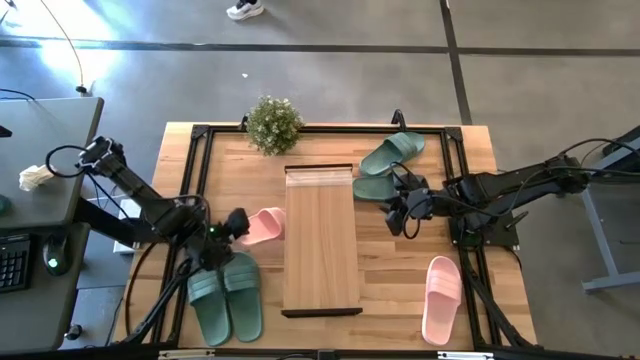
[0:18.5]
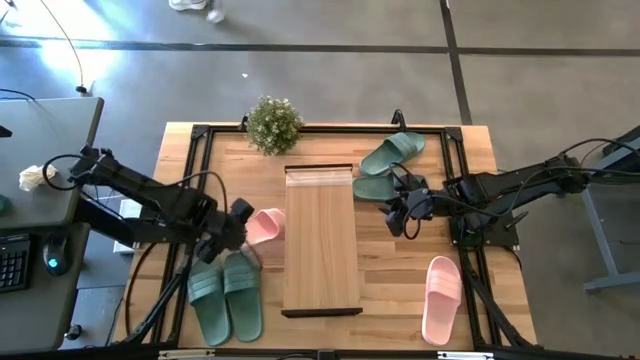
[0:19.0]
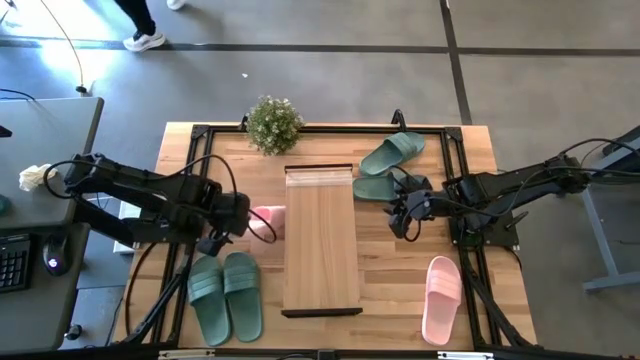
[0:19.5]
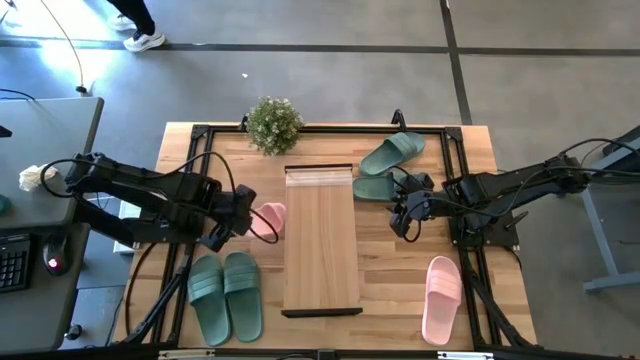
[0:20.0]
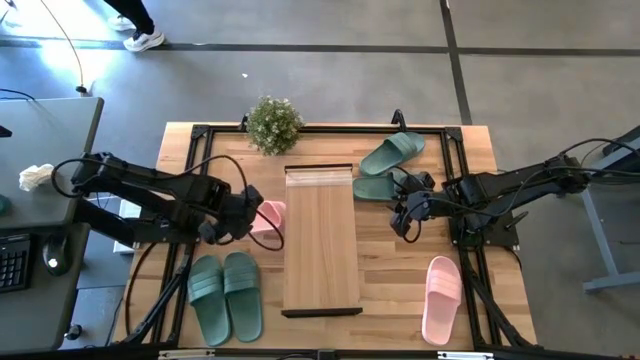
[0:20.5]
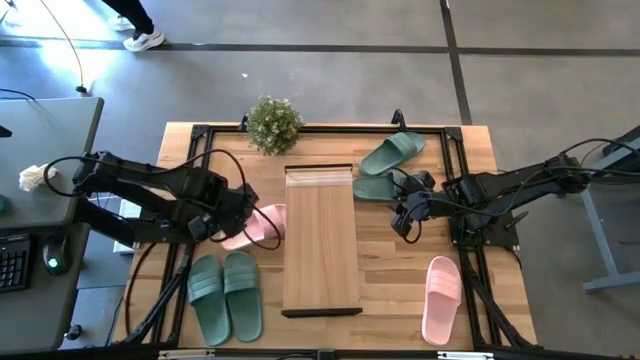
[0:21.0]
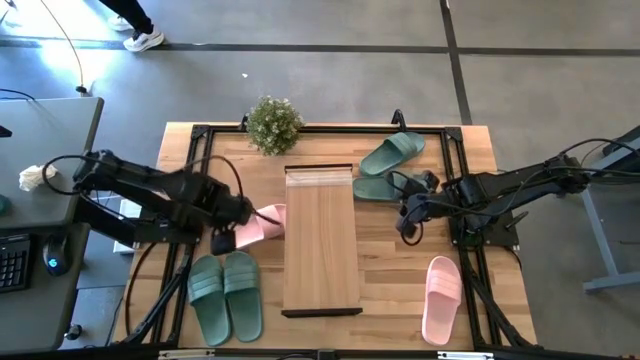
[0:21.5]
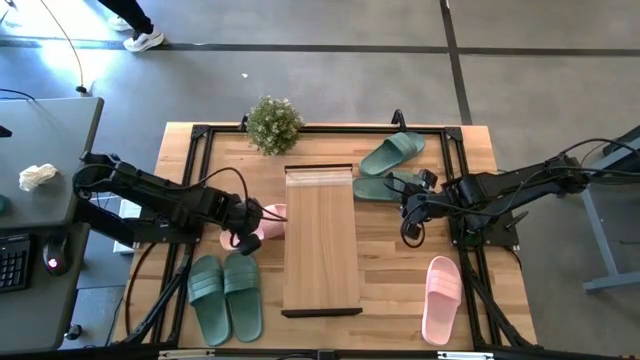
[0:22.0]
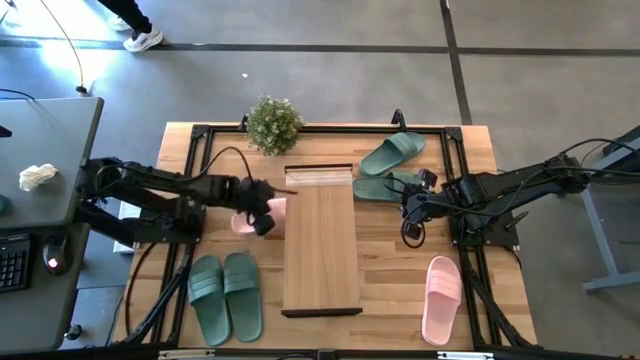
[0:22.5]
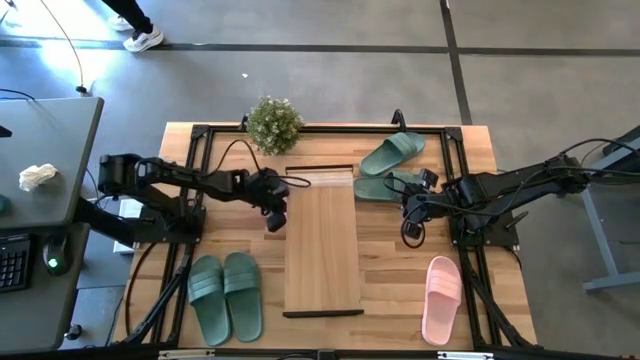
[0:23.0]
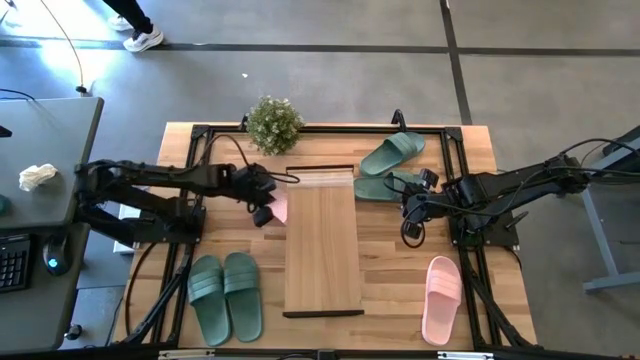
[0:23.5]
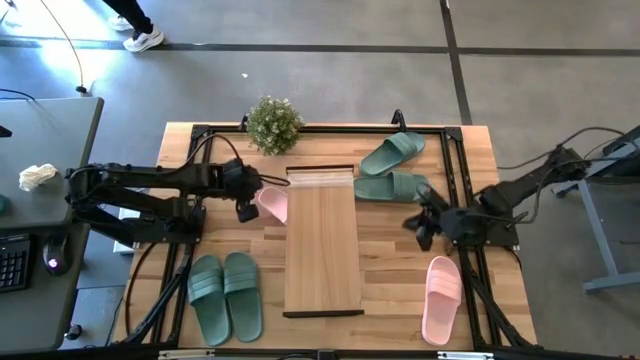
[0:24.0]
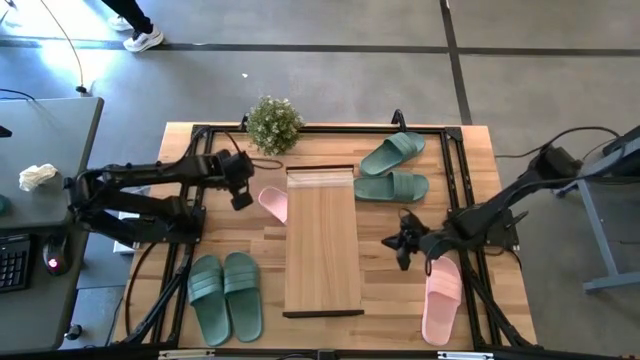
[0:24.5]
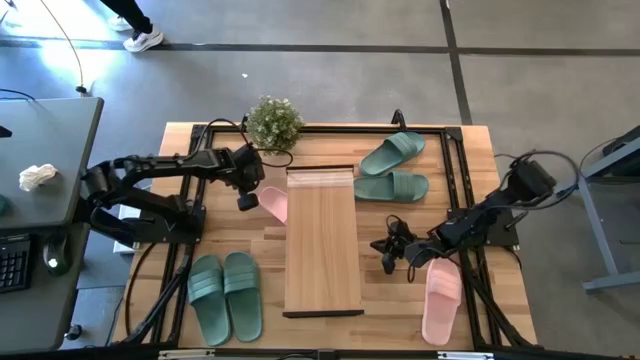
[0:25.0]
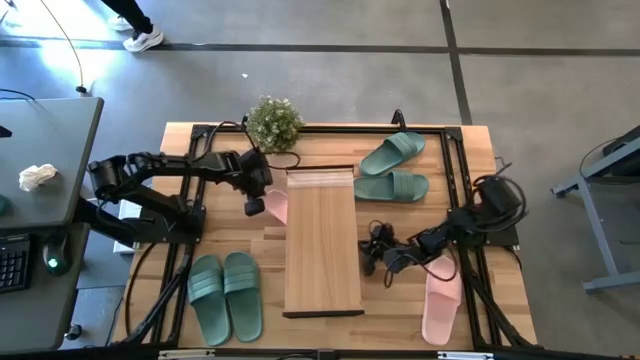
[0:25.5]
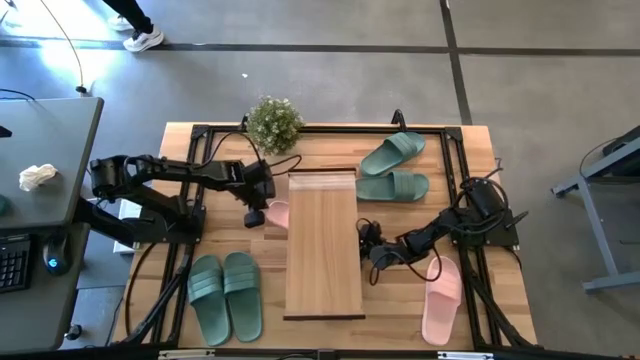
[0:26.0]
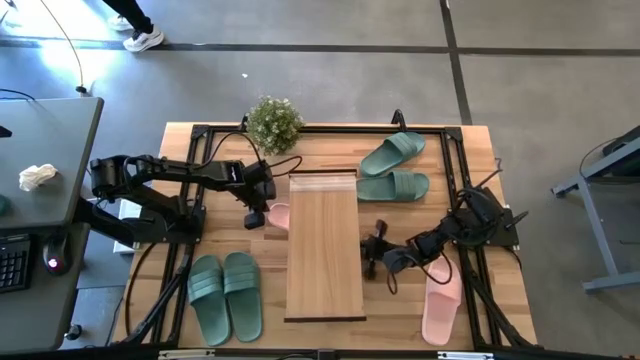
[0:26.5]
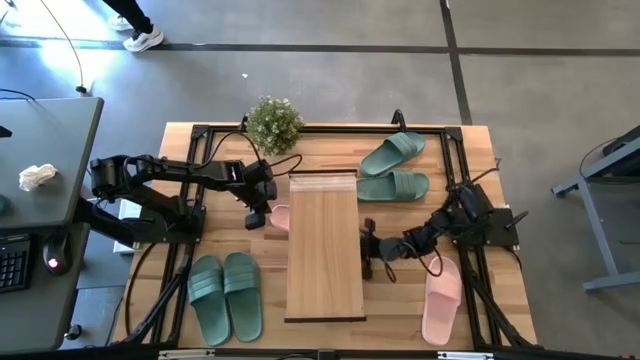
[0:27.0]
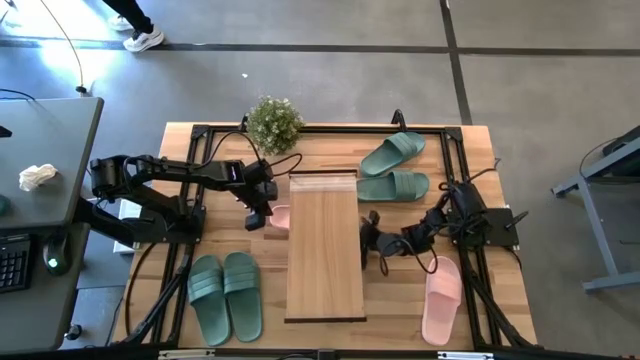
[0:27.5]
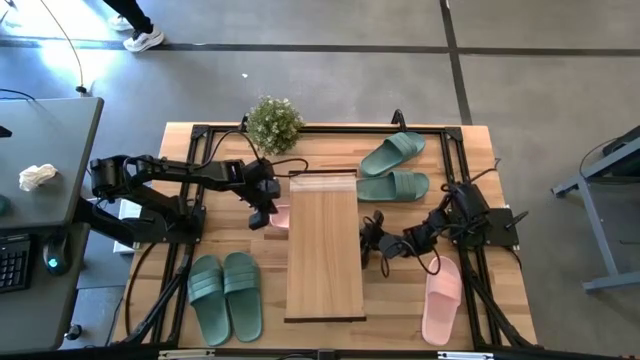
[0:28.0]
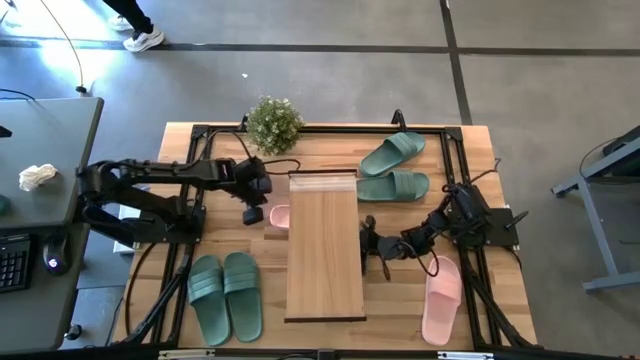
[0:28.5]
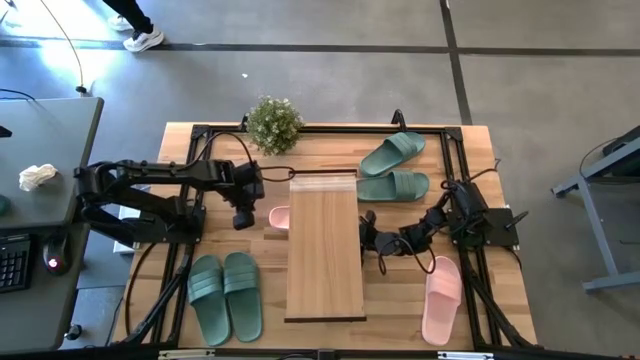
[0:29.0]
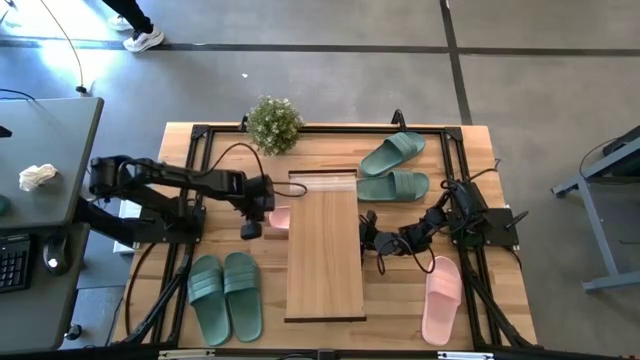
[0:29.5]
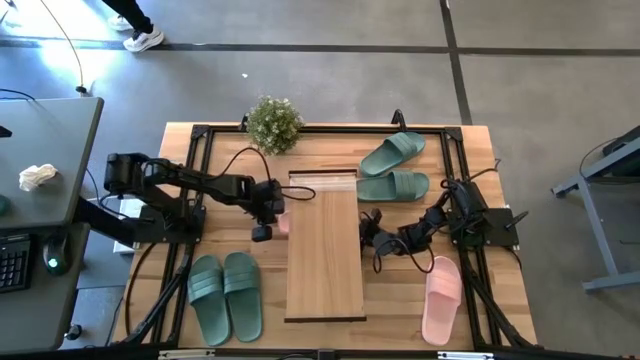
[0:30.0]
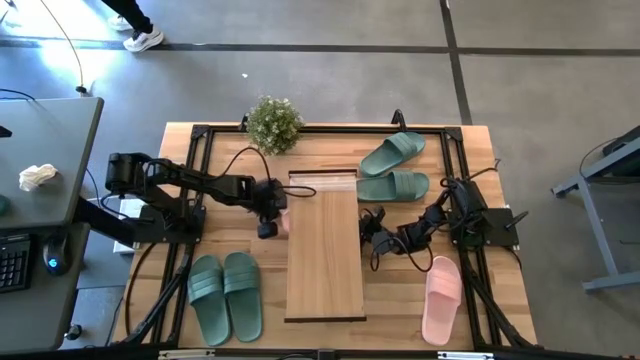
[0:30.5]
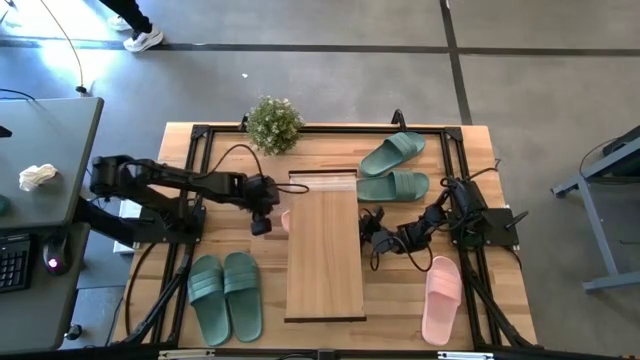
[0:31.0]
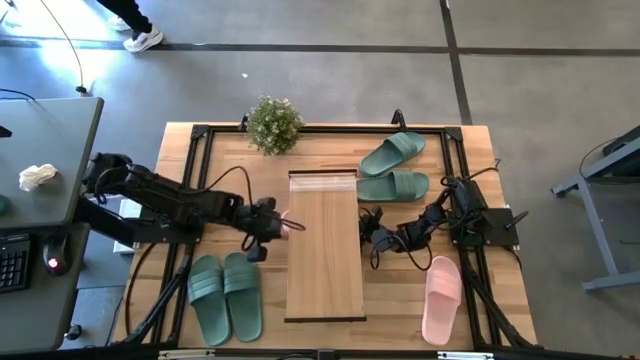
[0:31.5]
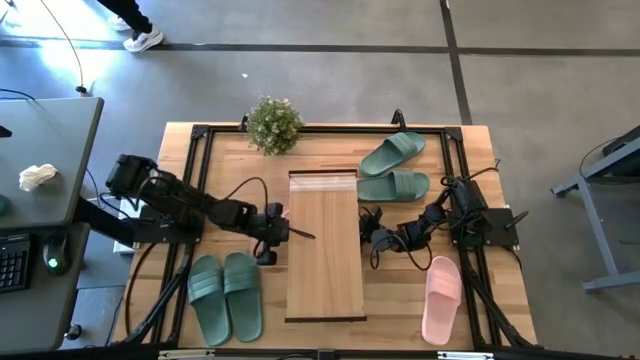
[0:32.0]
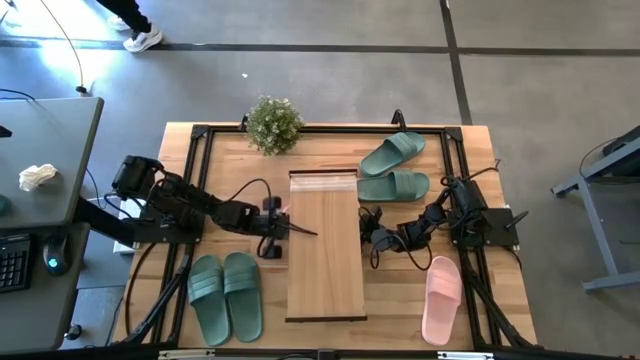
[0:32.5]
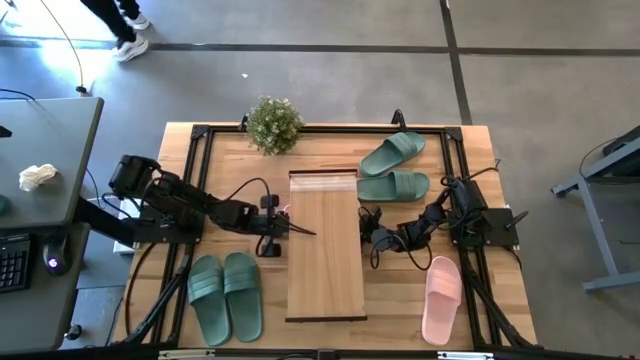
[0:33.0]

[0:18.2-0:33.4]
Task: Pick and place slides into the shelf
Put the left pink slide under the shelf

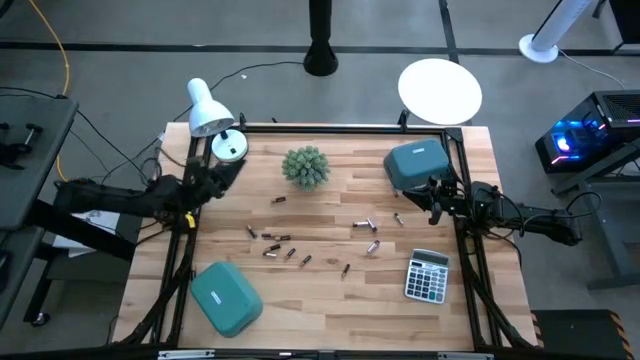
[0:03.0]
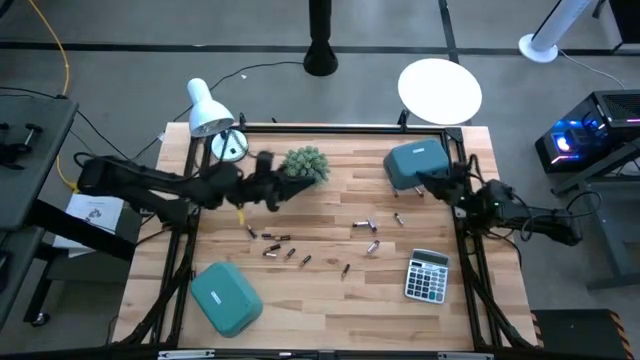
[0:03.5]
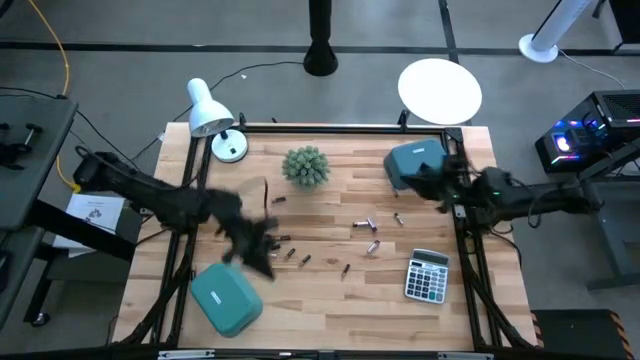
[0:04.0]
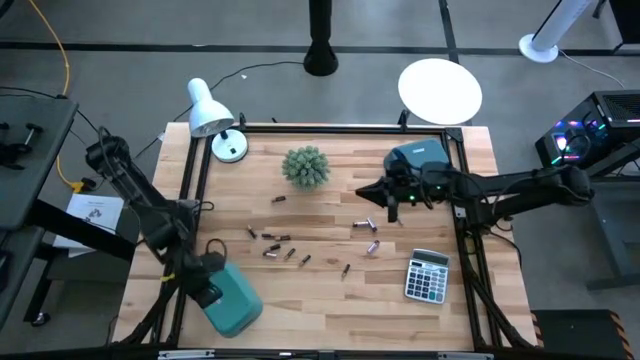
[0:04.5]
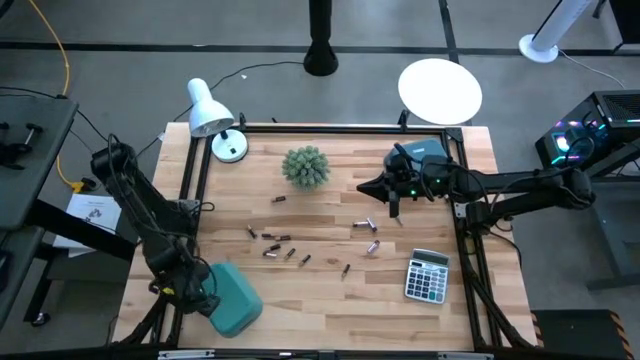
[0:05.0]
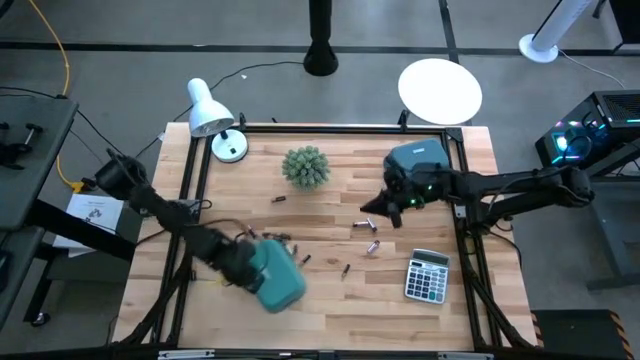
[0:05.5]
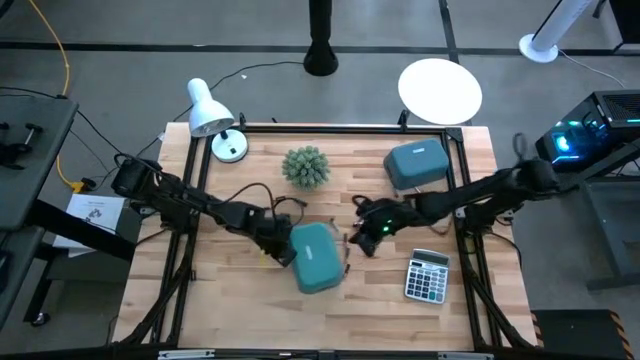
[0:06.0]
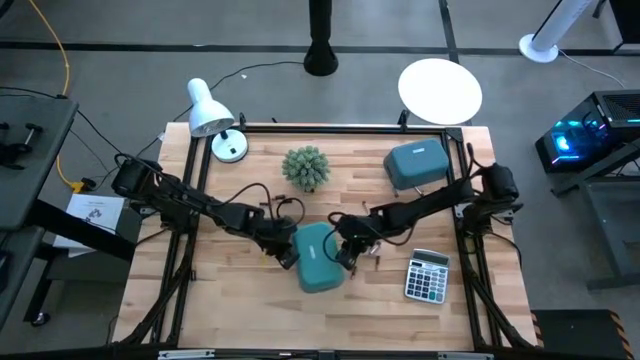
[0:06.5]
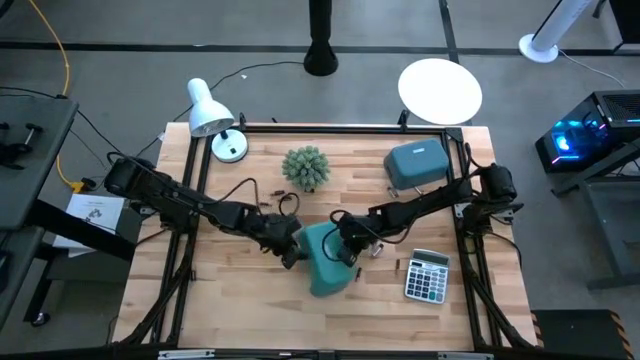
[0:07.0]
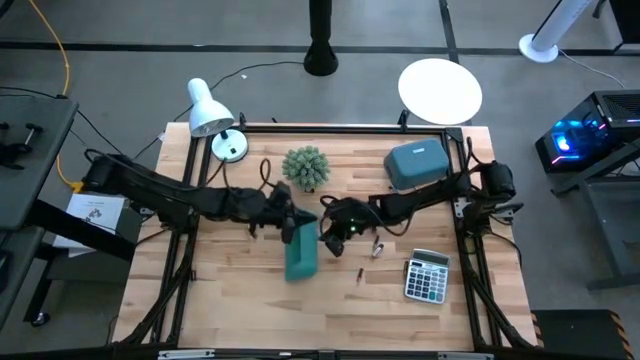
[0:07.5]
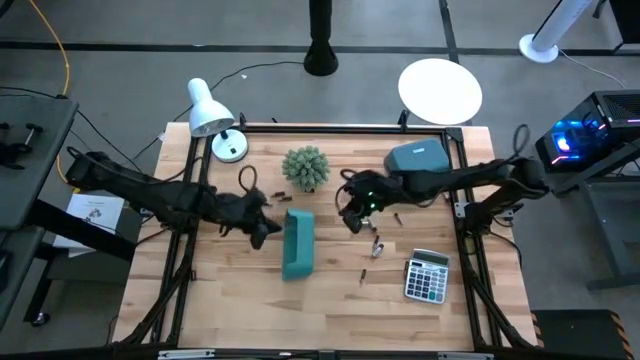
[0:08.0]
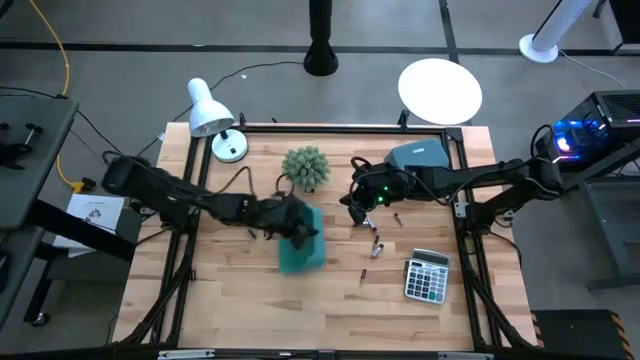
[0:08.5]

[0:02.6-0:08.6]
Task: Sort batteries
Prepare the green bin for the black batteries

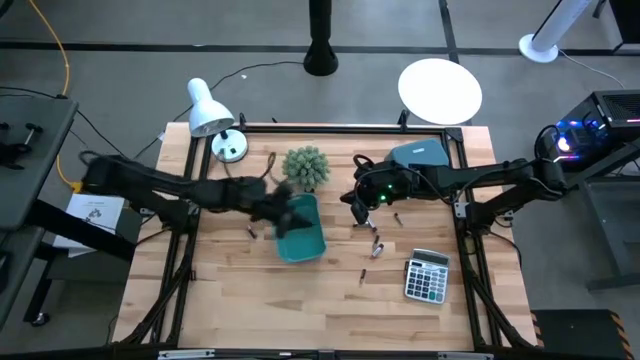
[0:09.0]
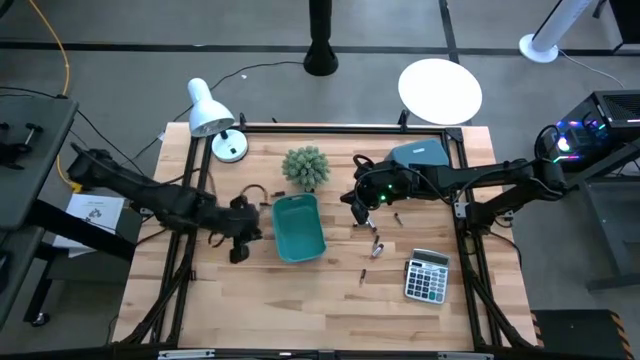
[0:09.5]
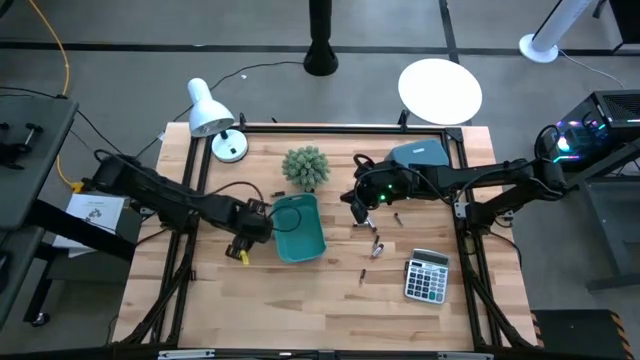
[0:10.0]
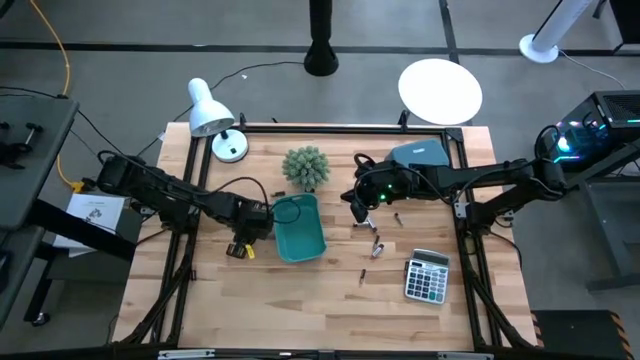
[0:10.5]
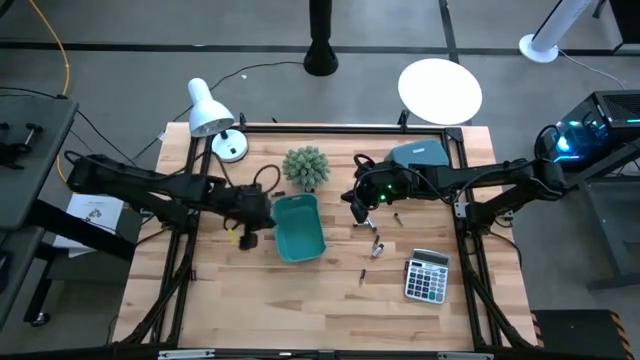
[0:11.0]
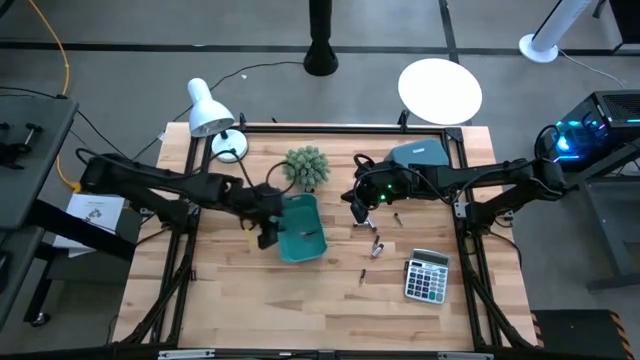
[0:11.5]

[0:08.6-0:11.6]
Put the black battery into the green bin
